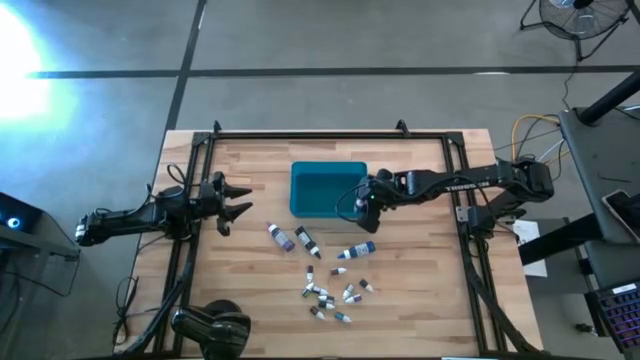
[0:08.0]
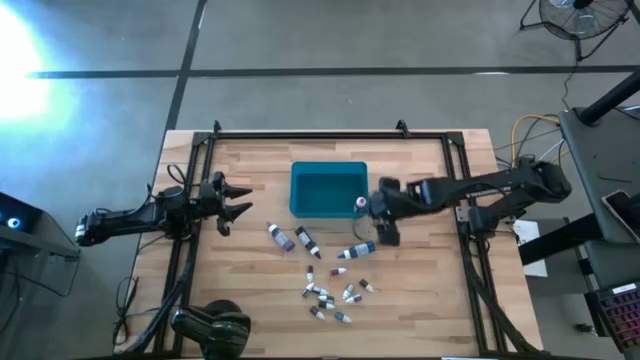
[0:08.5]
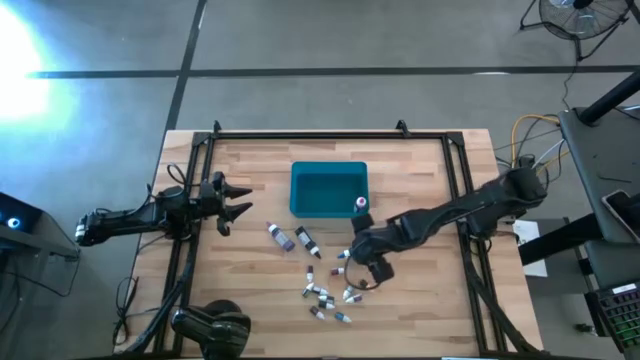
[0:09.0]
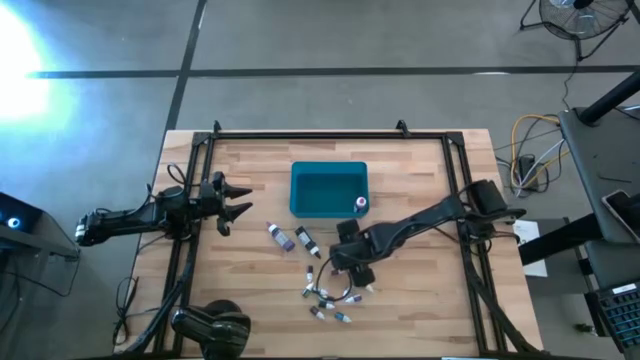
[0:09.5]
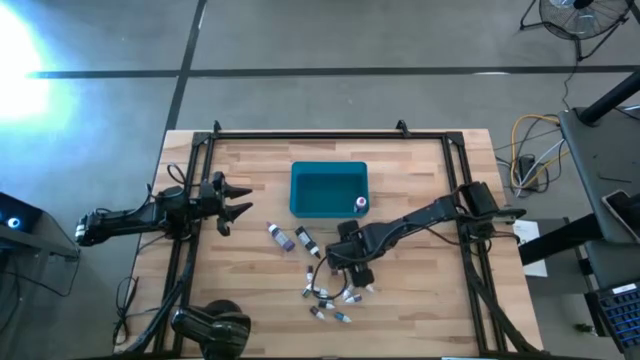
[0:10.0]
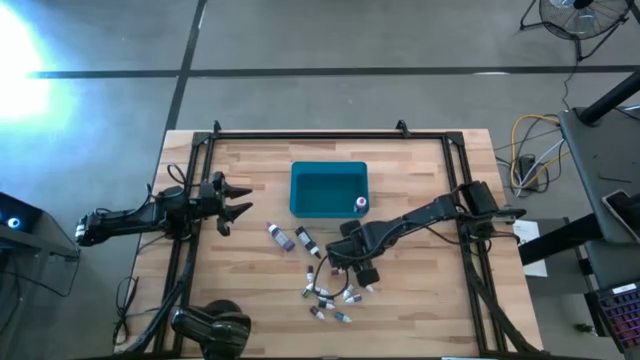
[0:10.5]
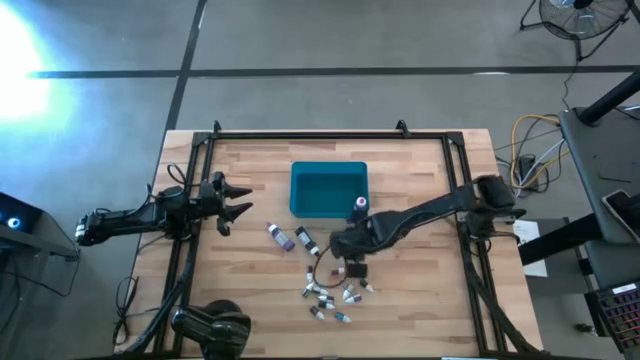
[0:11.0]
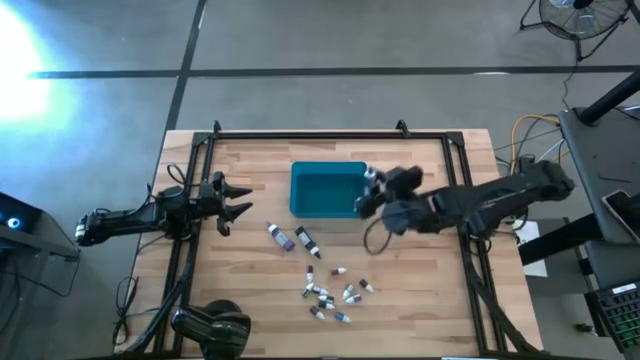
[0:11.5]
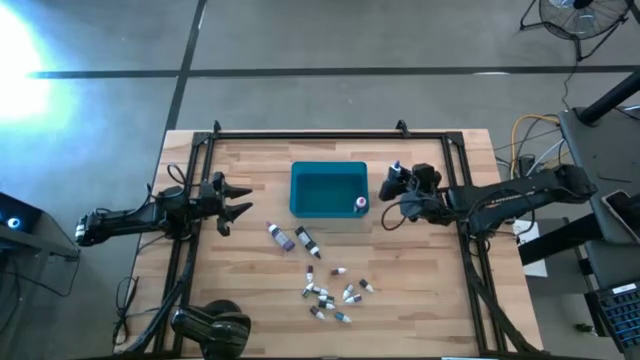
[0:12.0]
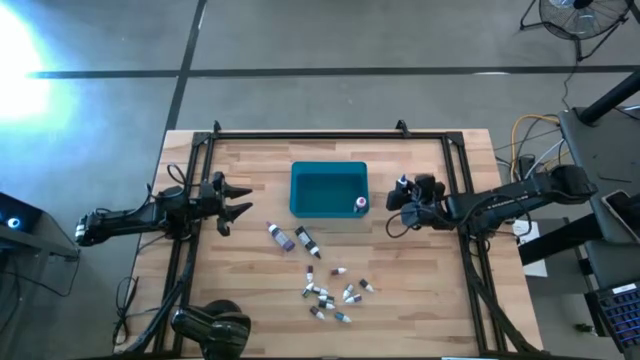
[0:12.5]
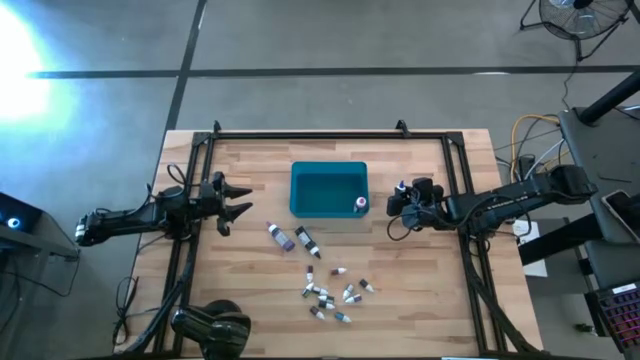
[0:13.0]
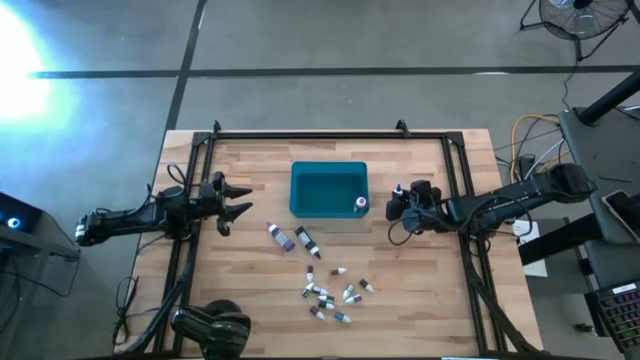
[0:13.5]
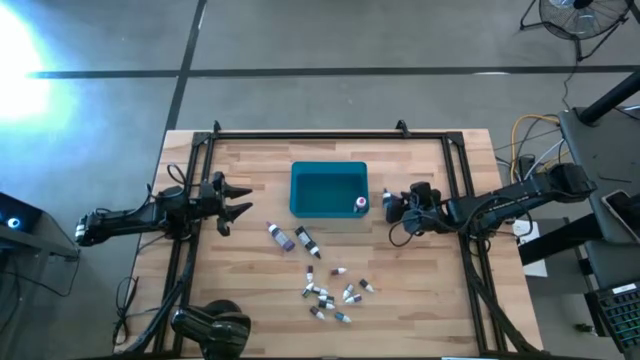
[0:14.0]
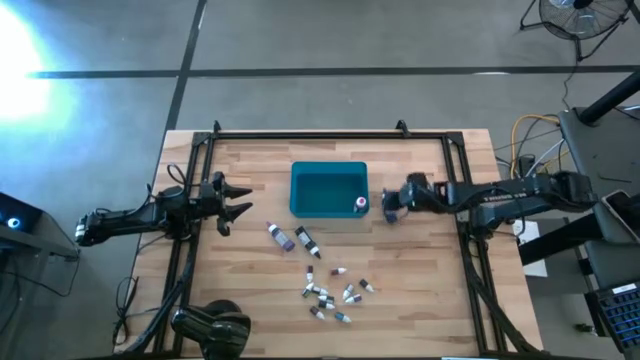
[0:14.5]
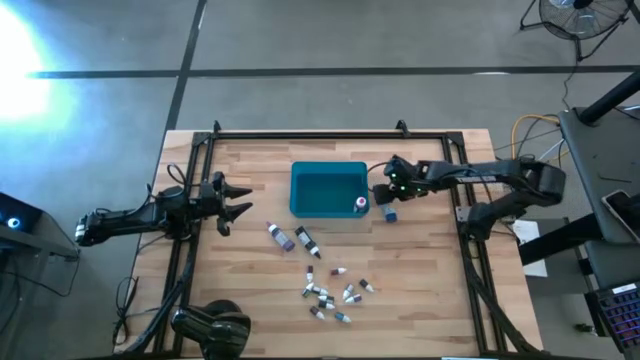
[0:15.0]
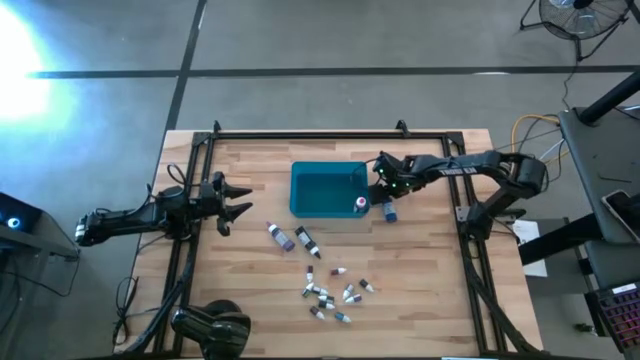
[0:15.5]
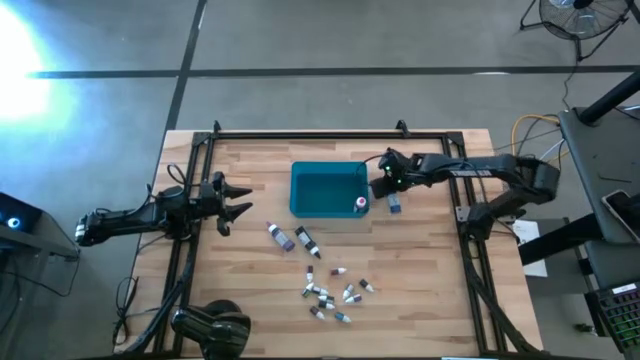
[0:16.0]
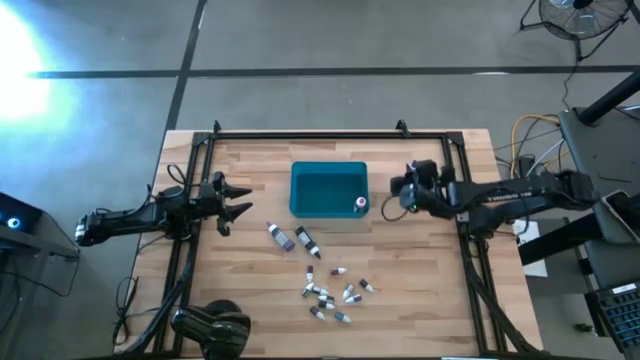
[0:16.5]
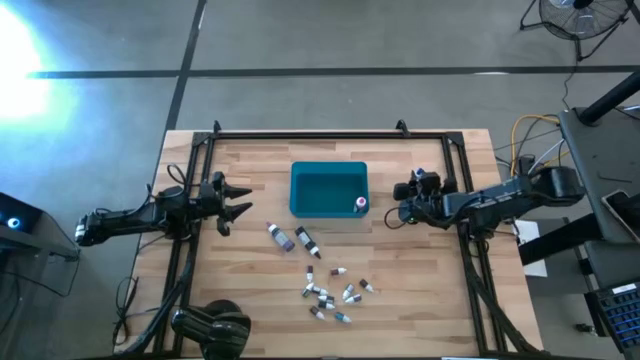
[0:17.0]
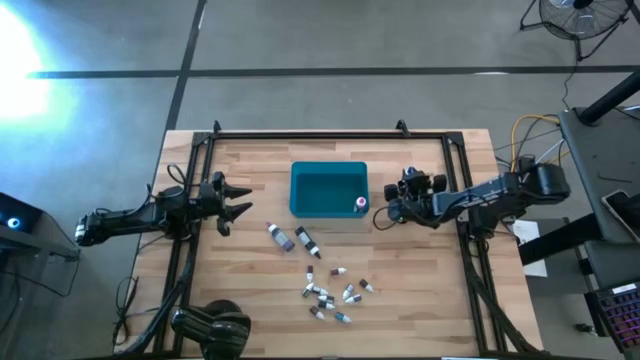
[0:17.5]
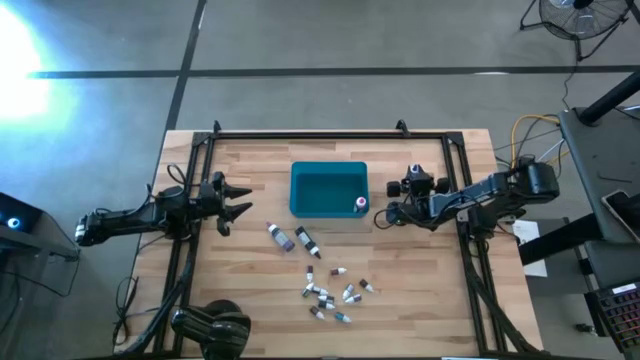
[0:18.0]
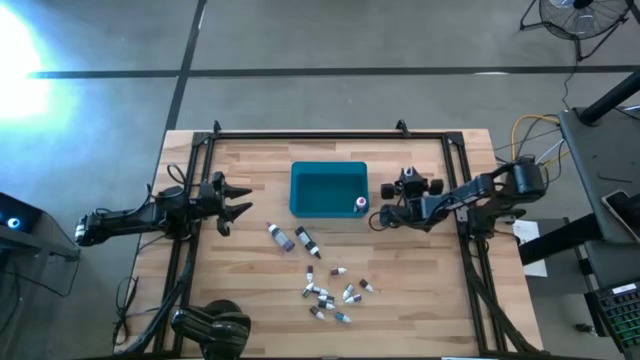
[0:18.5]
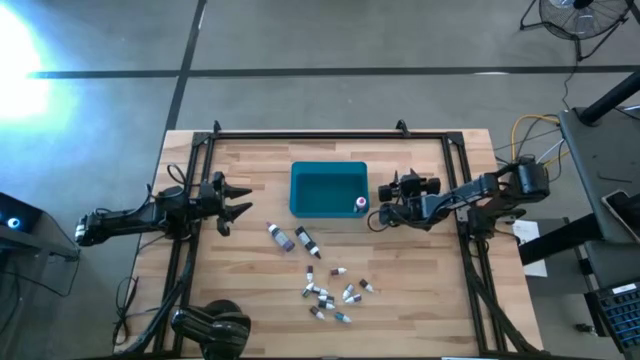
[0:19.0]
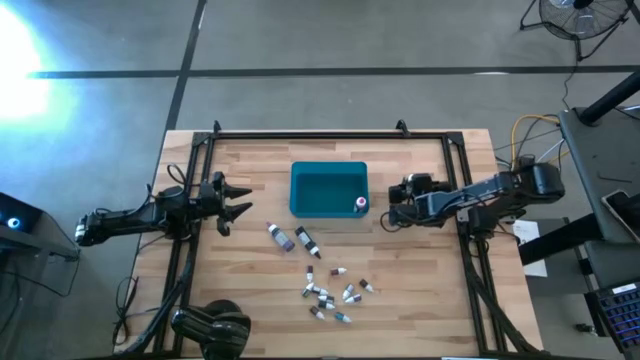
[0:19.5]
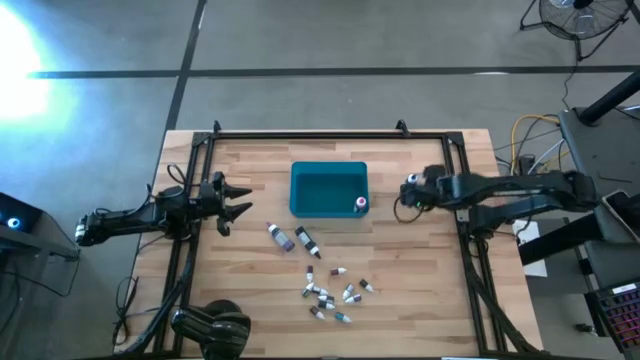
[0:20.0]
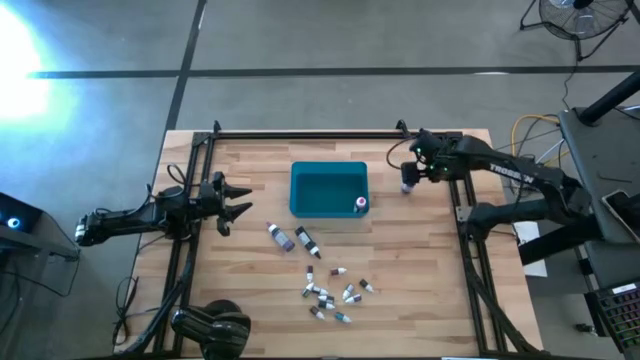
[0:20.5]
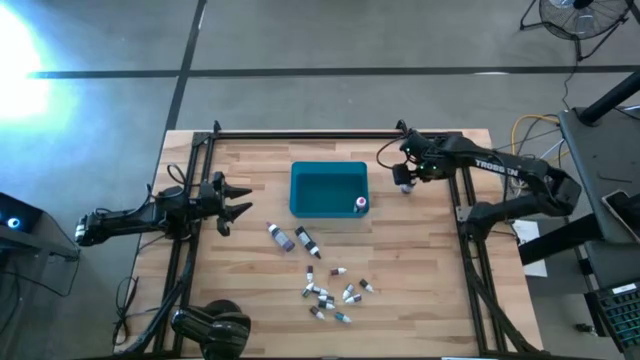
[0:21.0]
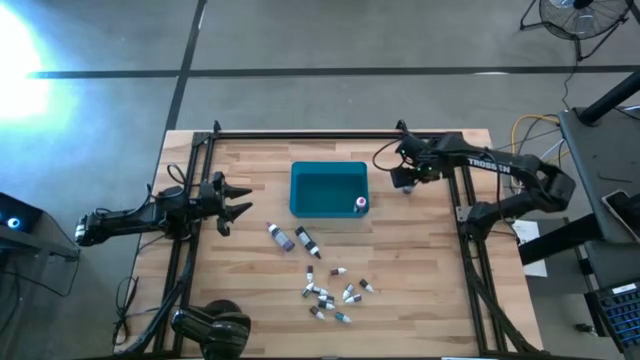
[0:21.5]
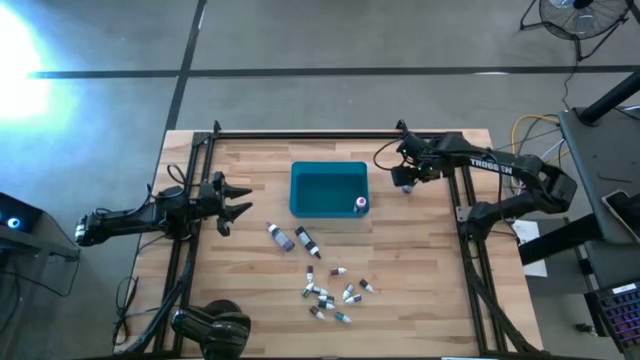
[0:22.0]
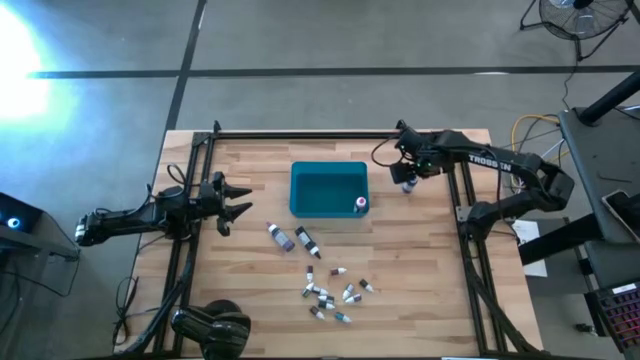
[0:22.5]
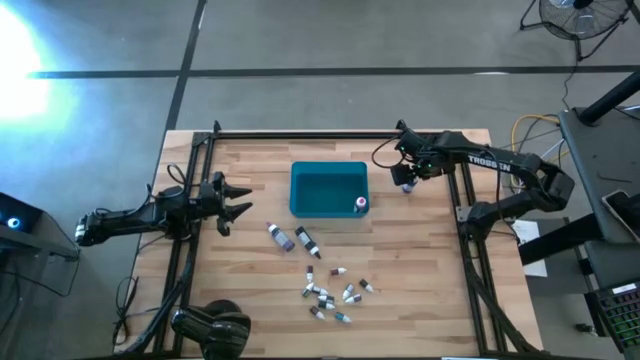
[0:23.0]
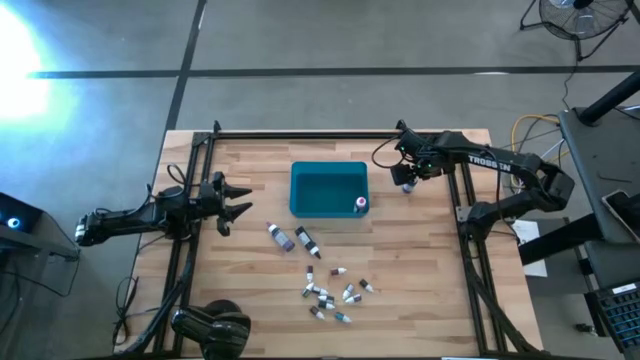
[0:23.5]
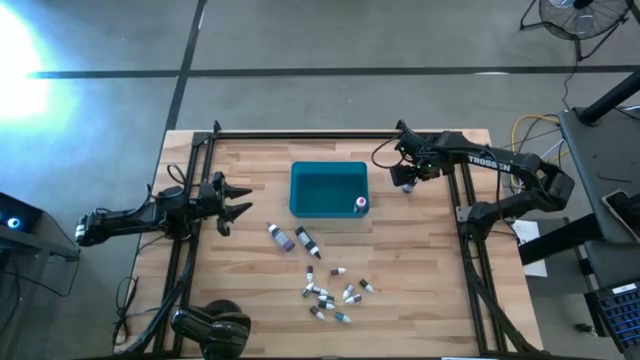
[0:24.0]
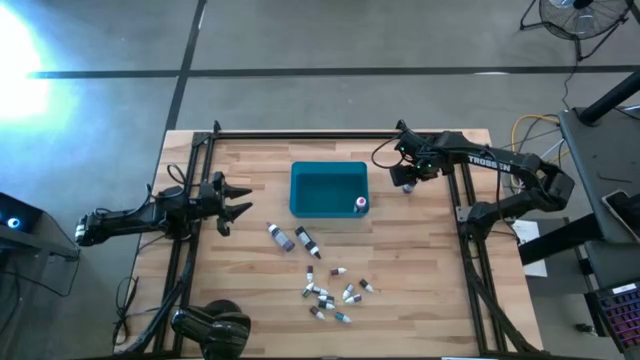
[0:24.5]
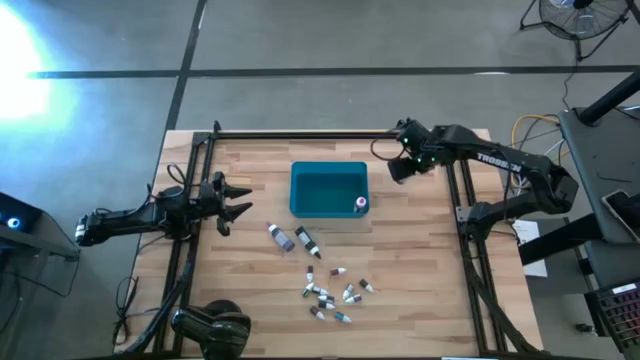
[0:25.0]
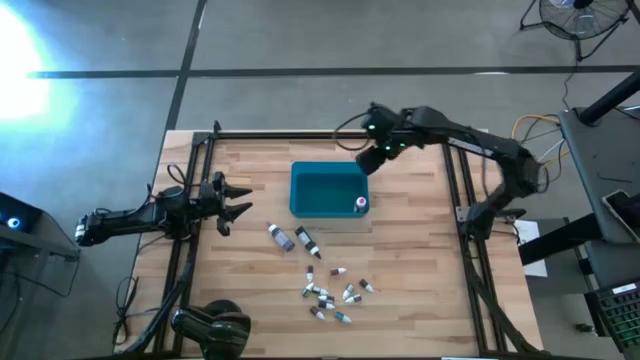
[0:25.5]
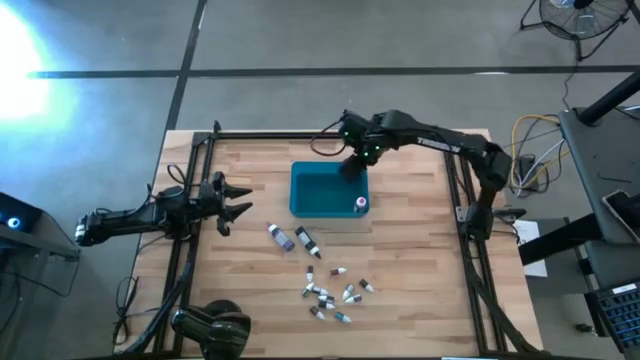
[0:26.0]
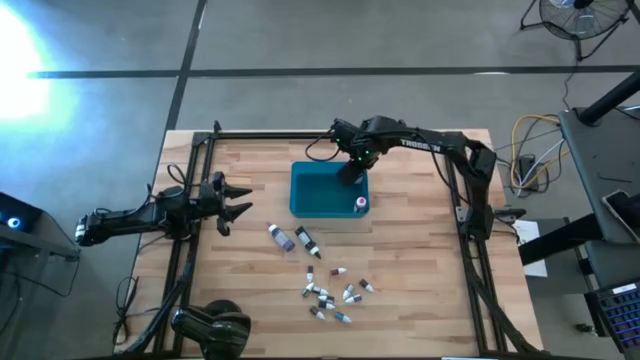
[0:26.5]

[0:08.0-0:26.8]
Task: Pick & Place food coloring
Put the blue food coloring bottle into the blue bin
